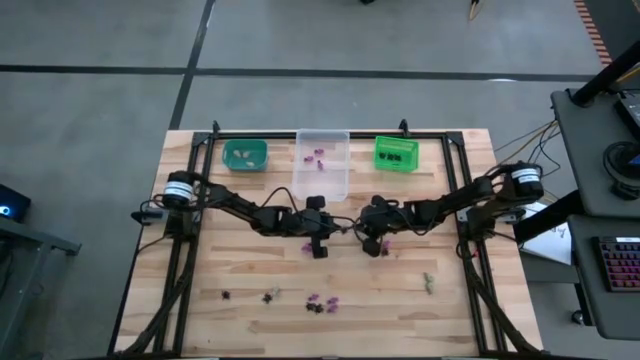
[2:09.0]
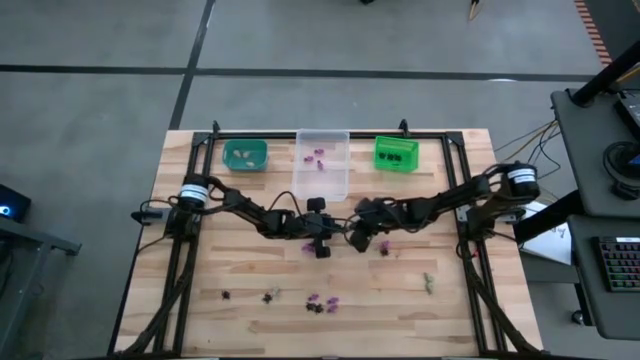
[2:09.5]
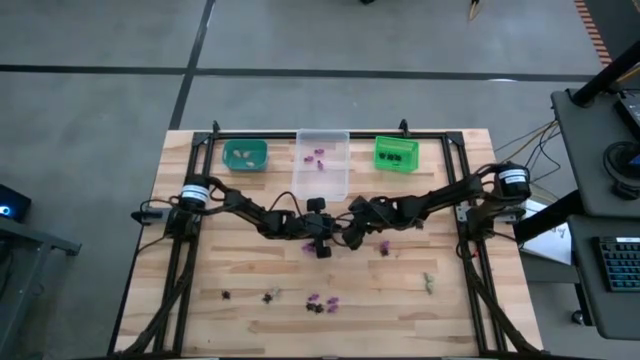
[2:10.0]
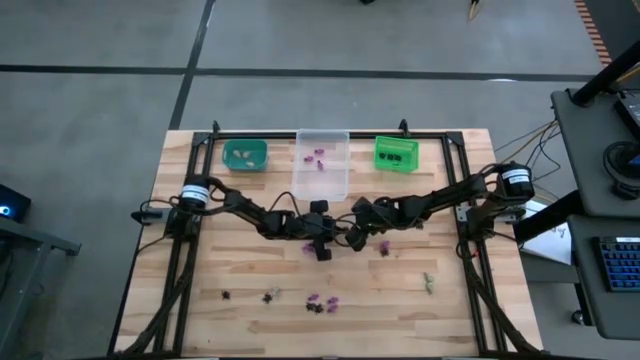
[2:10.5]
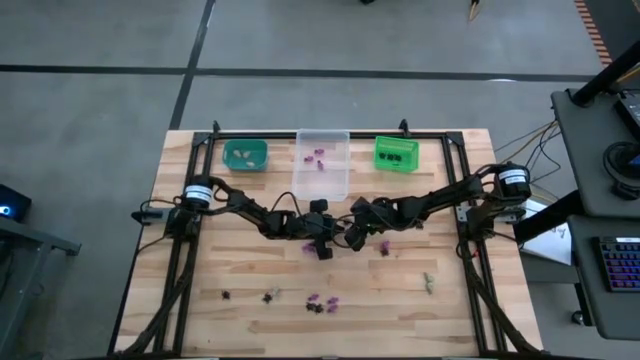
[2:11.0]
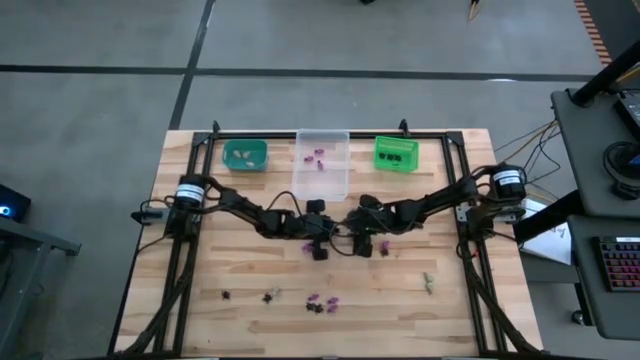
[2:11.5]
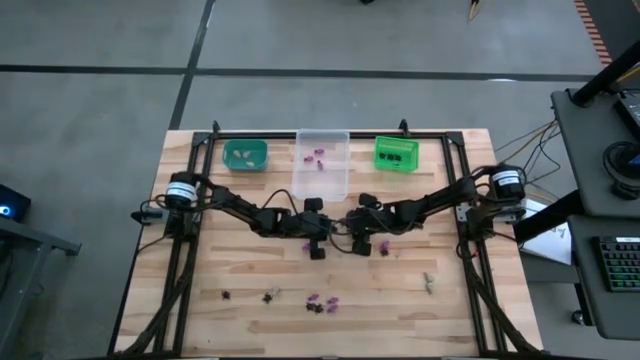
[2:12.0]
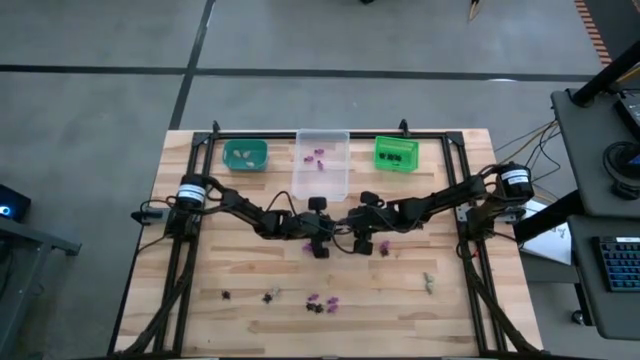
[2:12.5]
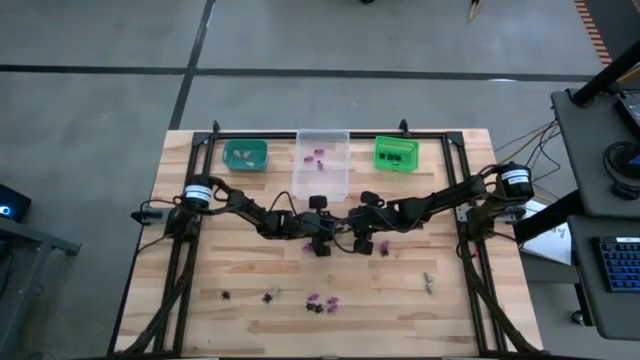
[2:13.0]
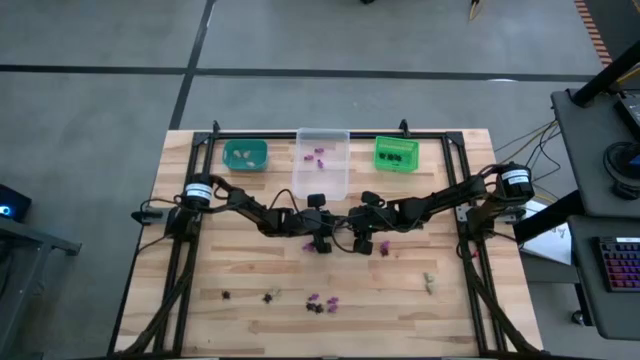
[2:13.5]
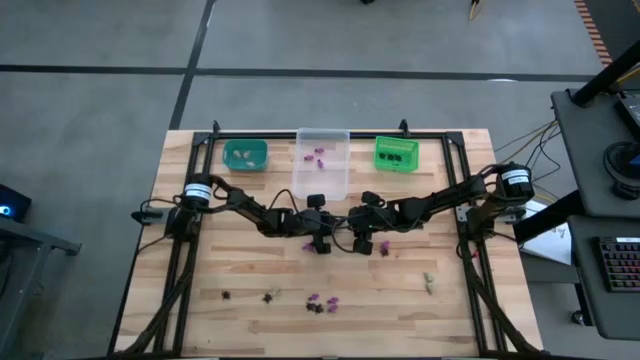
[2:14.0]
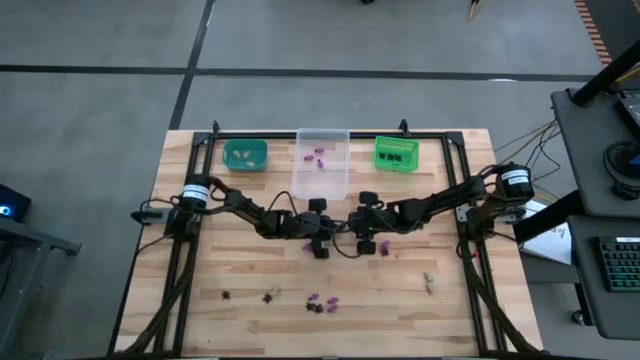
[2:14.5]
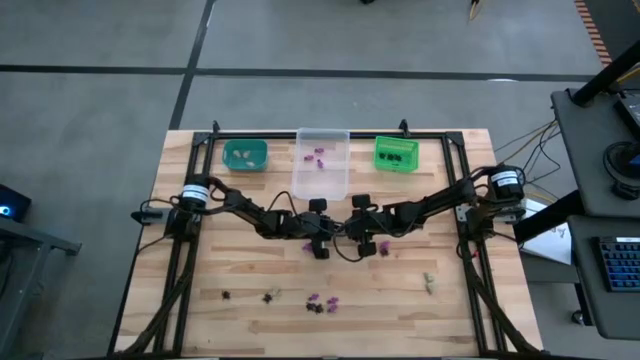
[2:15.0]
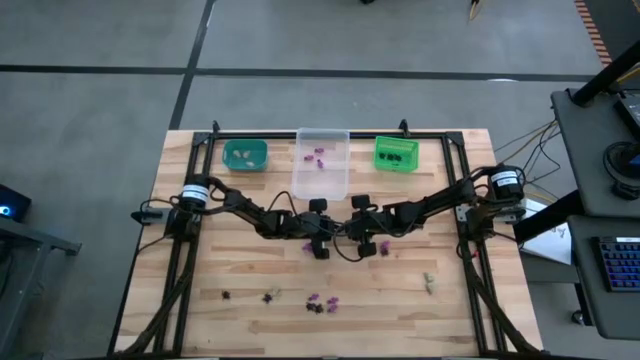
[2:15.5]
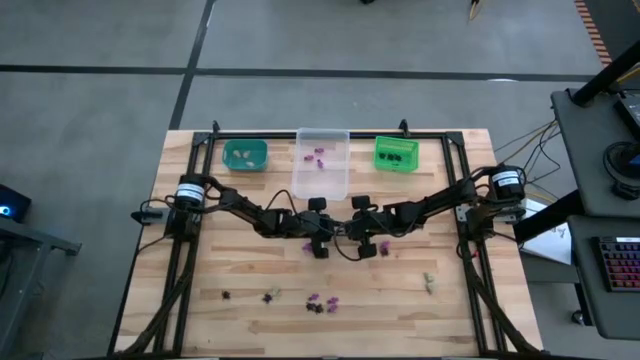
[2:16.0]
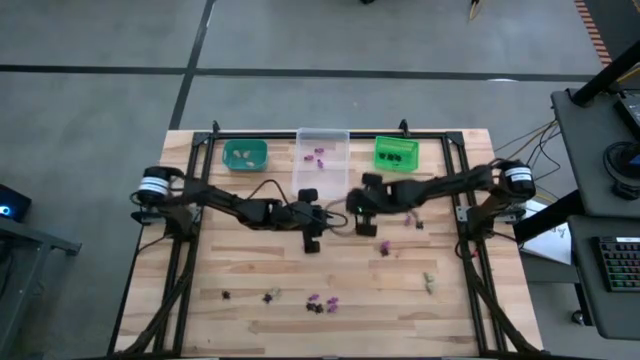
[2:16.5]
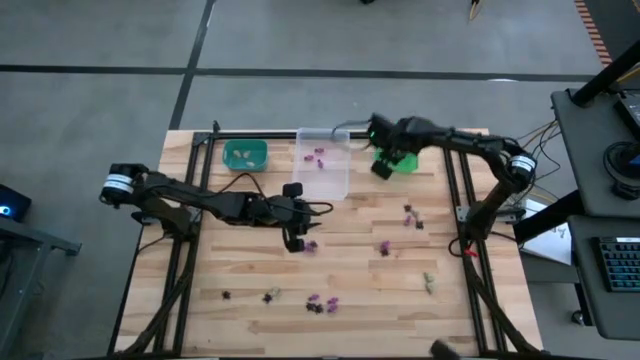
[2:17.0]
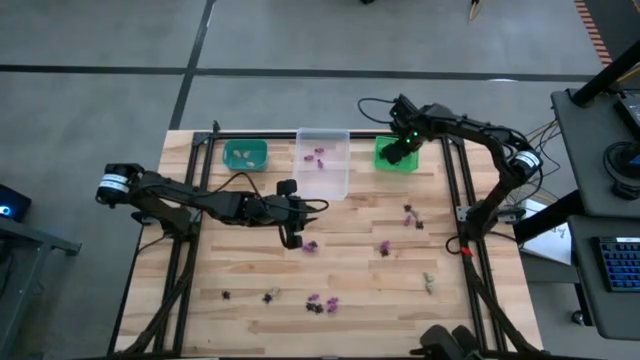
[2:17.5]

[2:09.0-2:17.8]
Task: Sort Halloween decoration
Put the black spider toy into the green bin

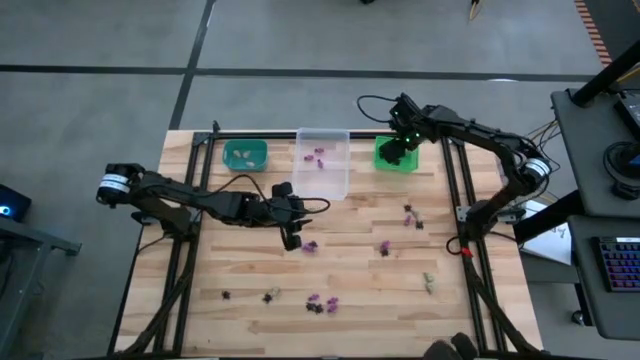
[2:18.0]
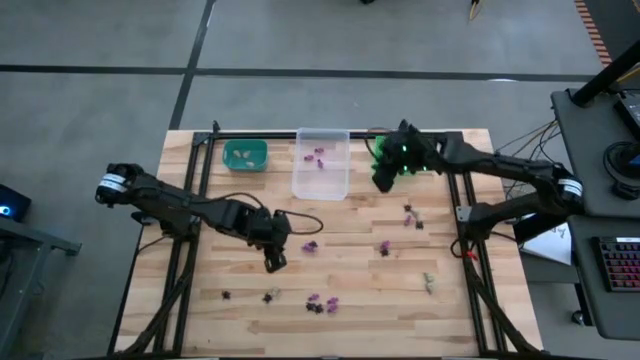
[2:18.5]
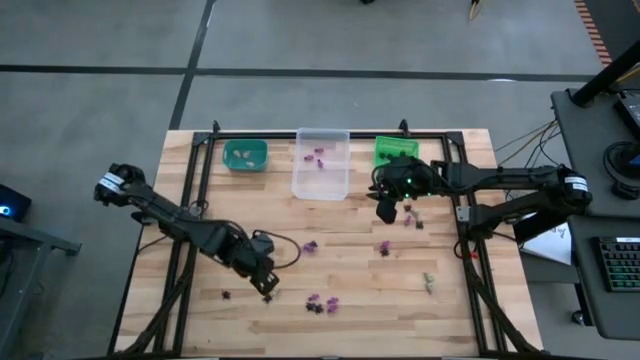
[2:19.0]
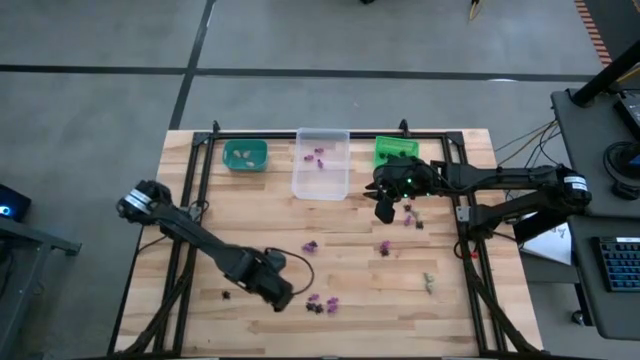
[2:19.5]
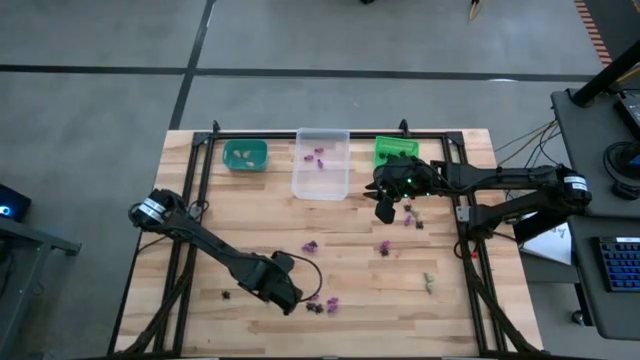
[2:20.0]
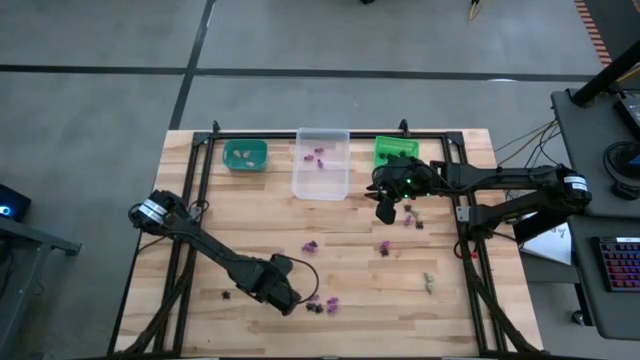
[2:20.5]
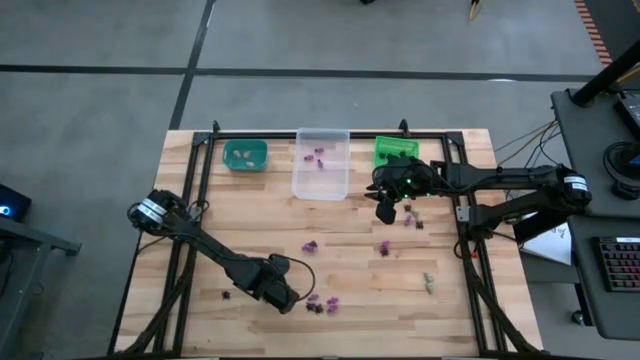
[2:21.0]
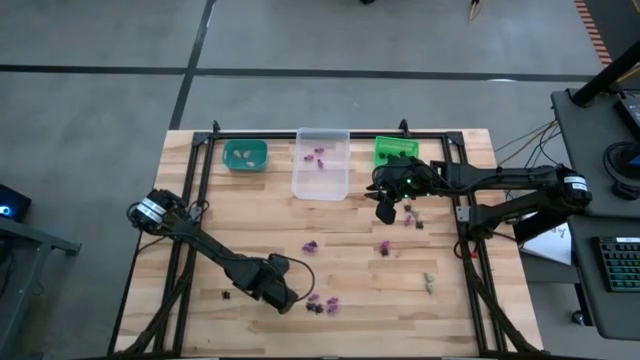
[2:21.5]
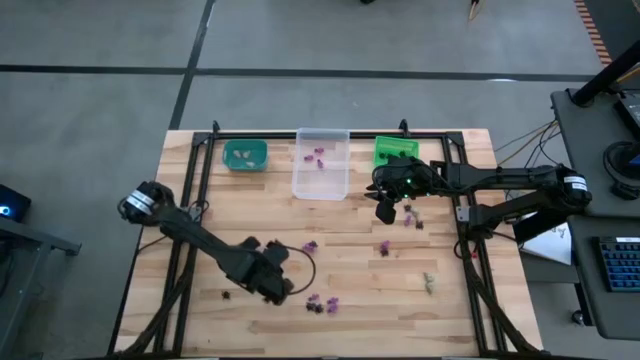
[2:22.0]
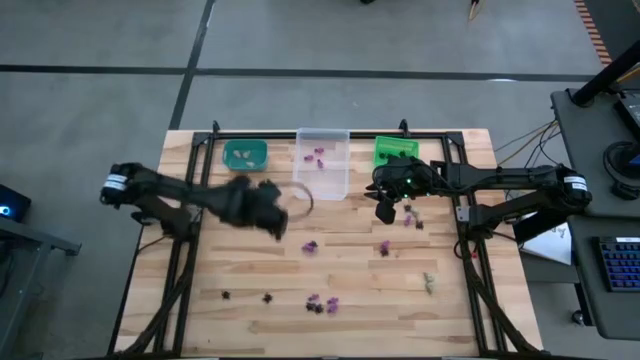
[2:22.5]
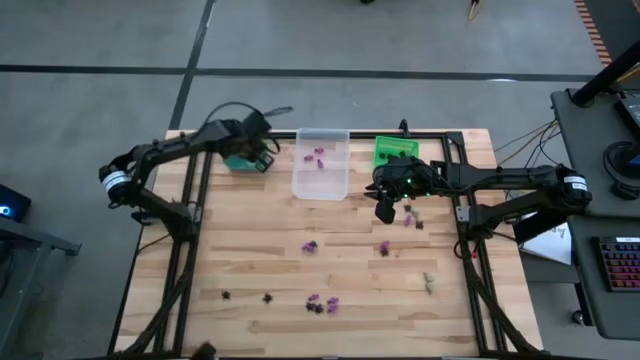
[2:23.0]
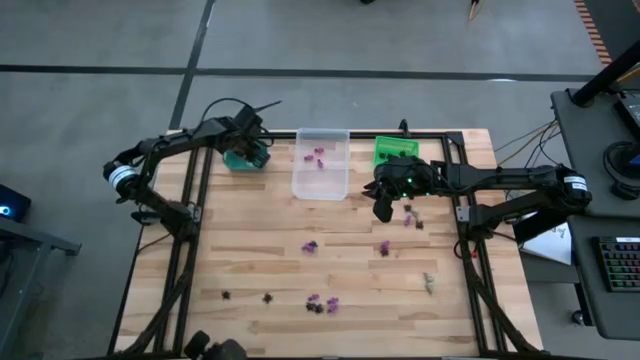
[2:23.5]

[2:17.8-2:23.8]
Put the white skull toy into the light blue bin

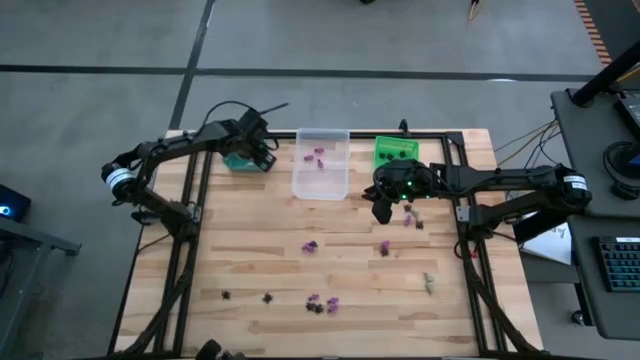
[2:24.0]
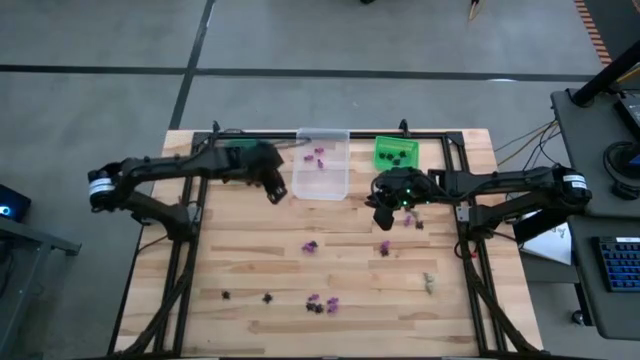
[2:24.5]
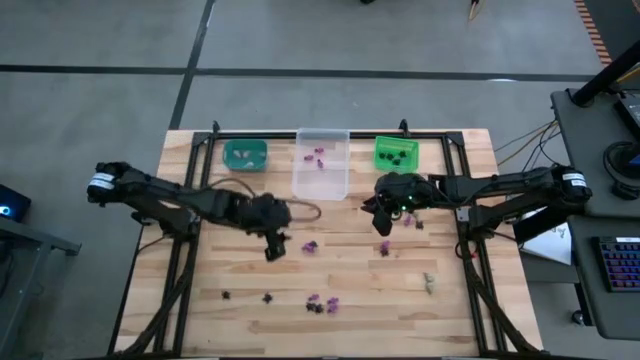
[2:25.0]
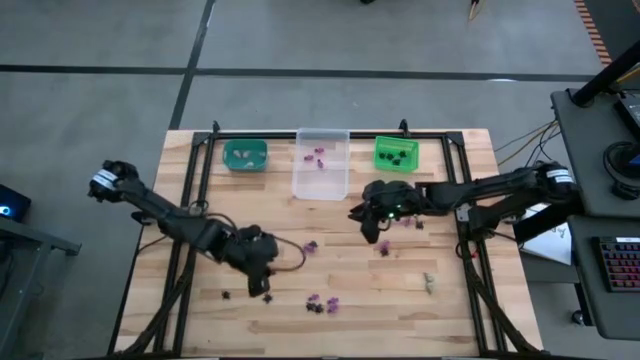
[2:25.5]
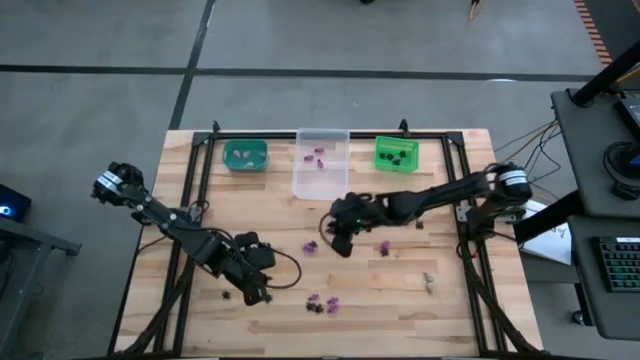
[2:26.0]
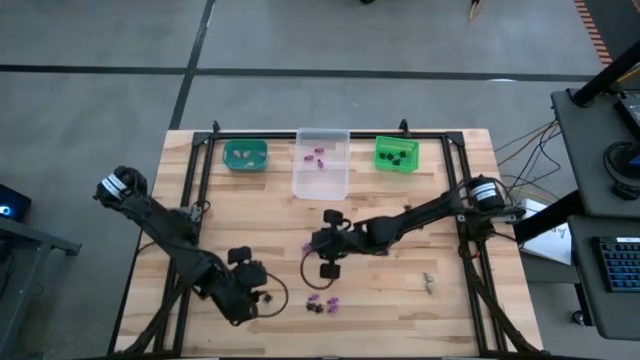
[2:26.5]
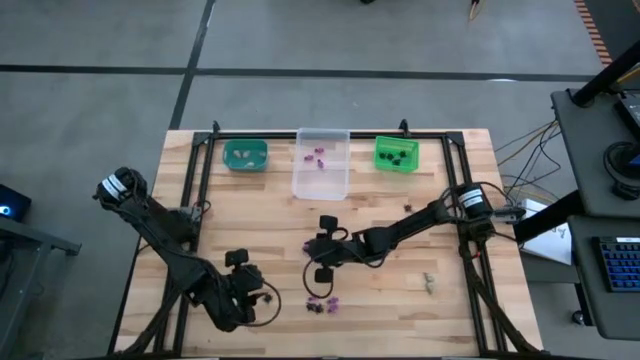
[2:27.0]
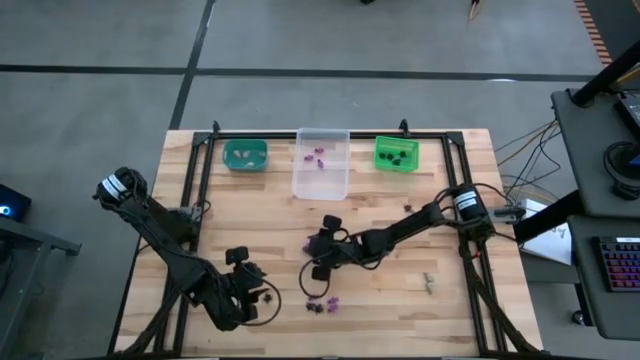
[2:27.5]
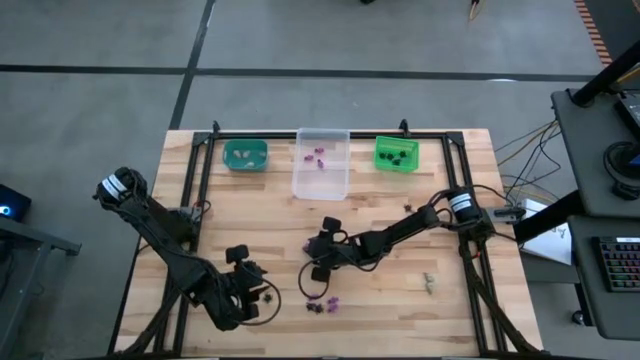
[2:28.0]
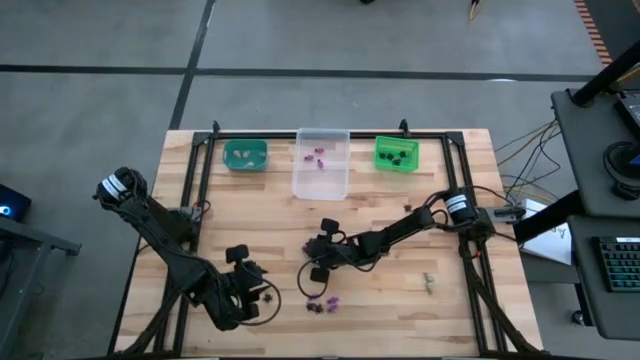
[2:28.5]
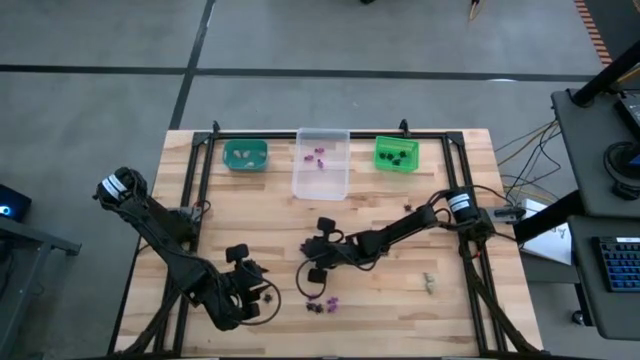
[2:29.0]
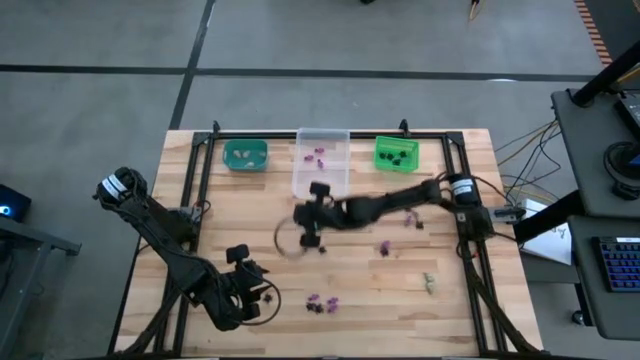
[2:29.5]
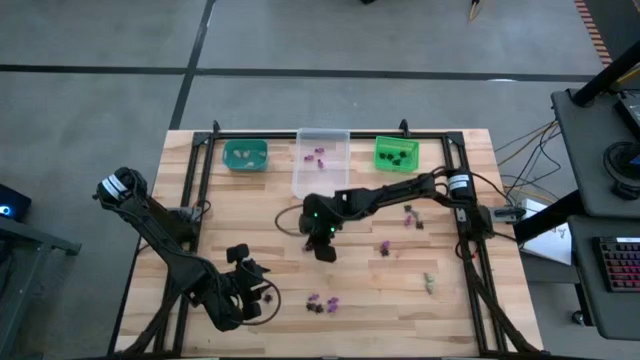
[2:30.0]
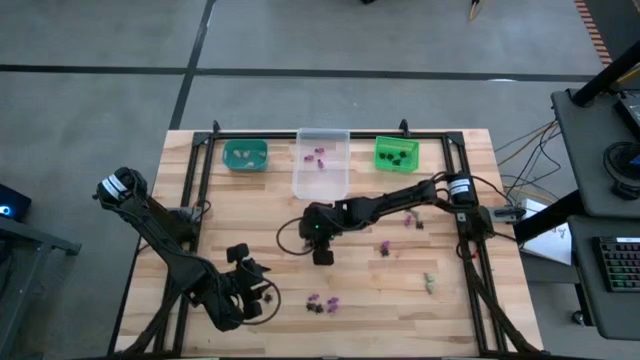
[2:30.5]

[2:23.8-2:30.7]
Put the violet skeleton toy into the transparent bin

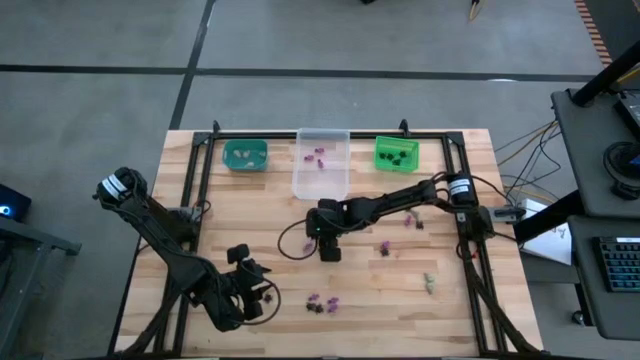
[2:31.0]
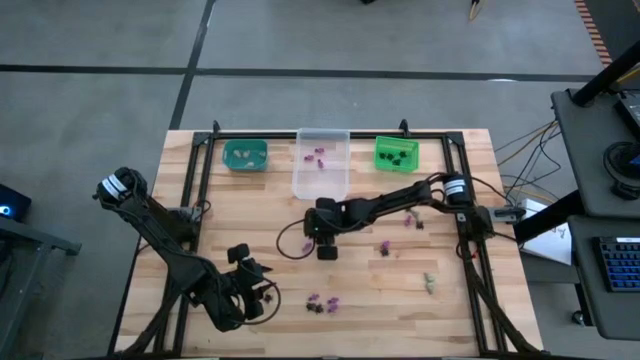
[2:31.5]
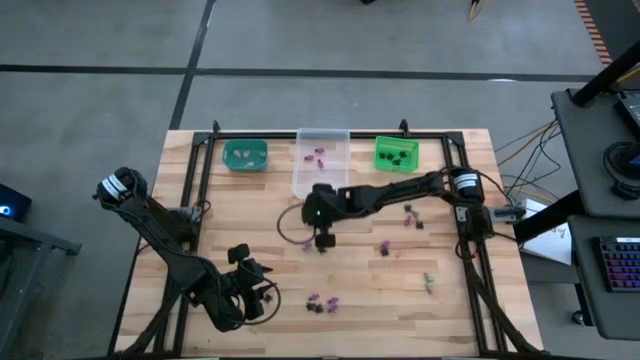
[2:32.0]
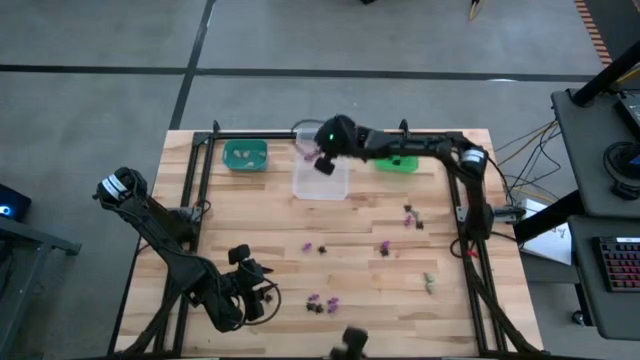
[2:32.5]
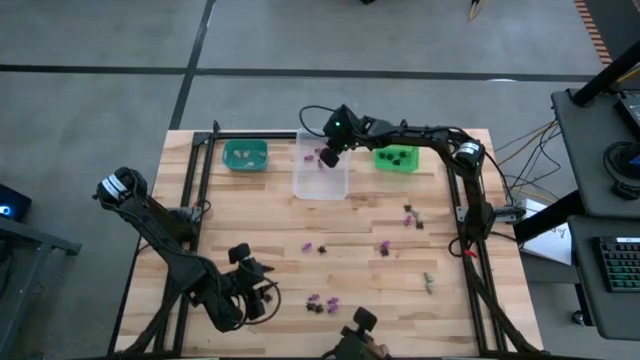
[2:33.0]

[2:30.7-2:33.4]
Put the violet skeleton toy into the transparent bin
